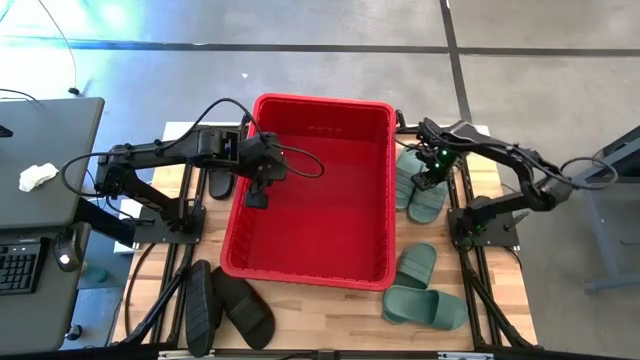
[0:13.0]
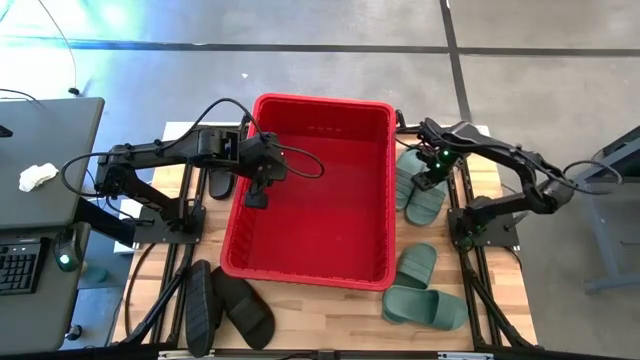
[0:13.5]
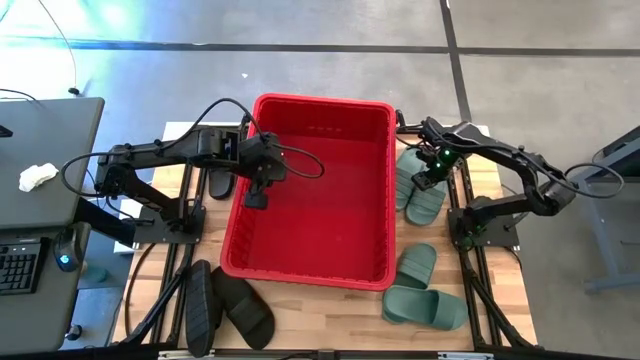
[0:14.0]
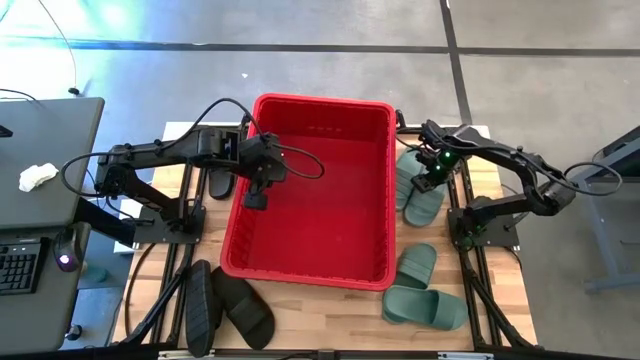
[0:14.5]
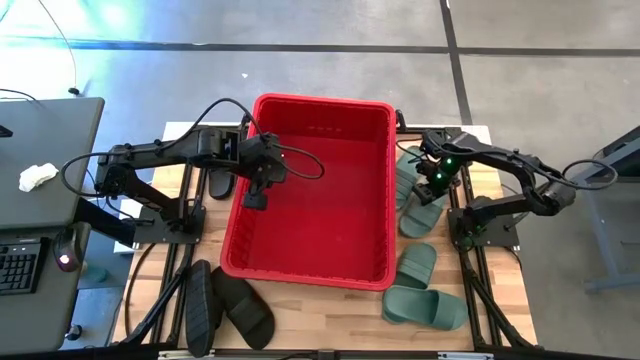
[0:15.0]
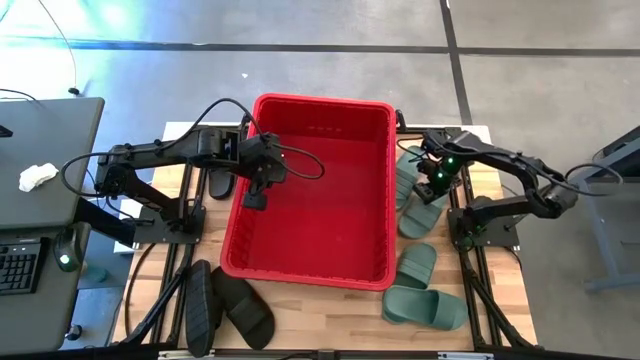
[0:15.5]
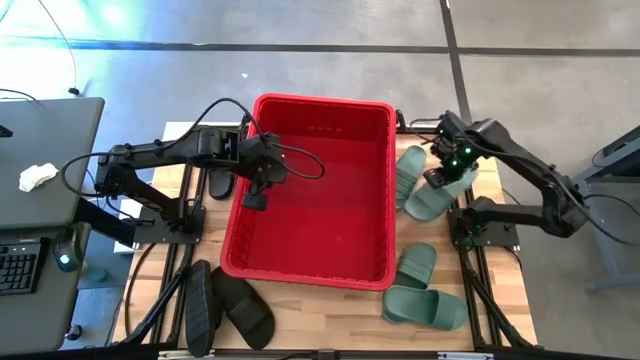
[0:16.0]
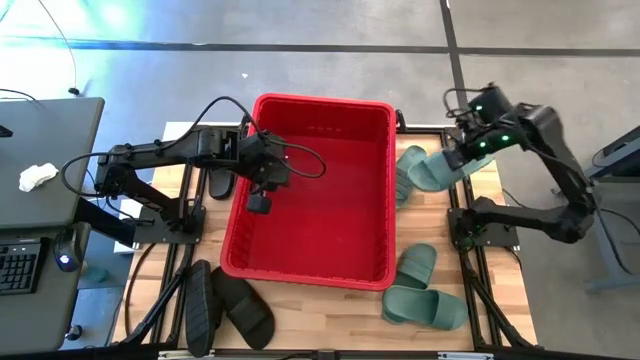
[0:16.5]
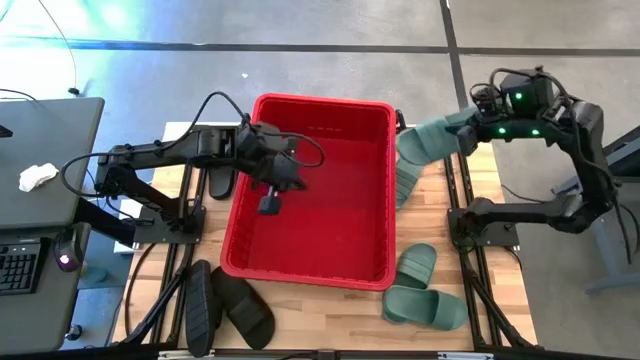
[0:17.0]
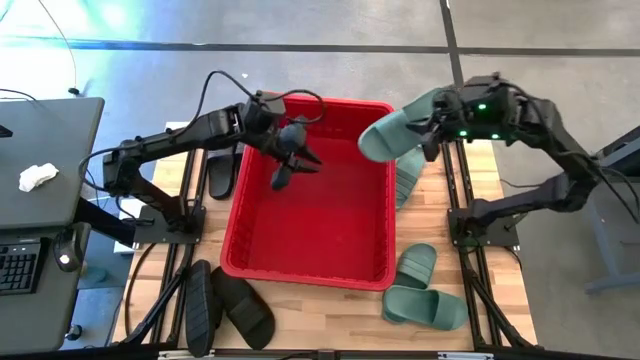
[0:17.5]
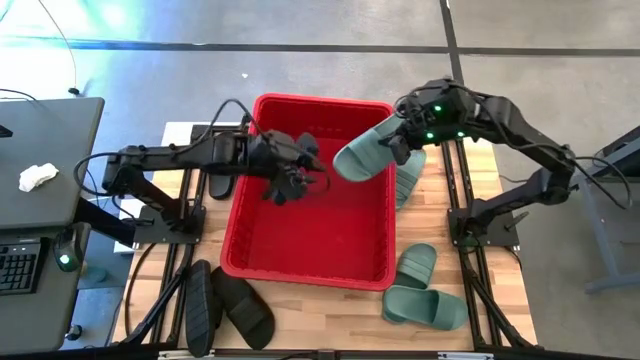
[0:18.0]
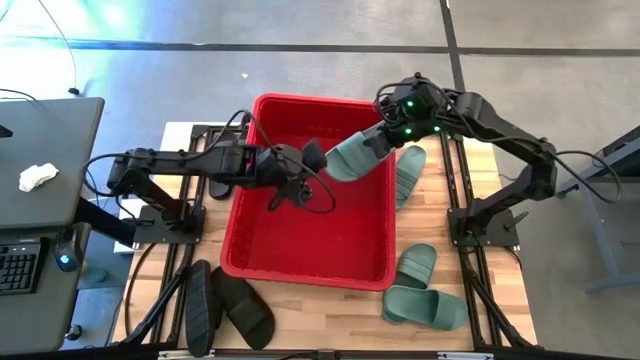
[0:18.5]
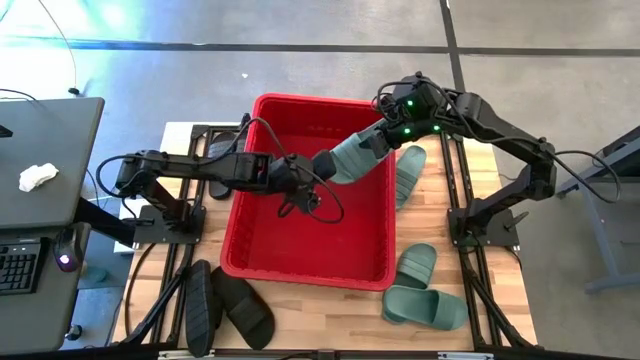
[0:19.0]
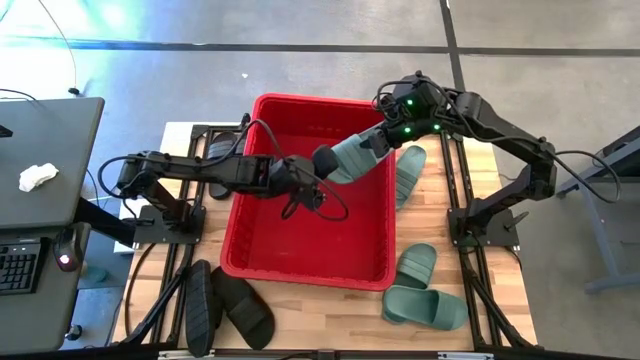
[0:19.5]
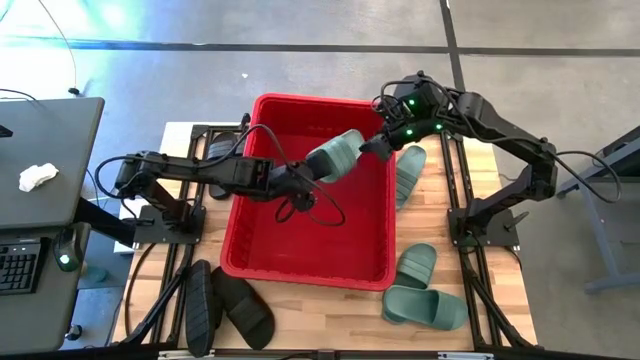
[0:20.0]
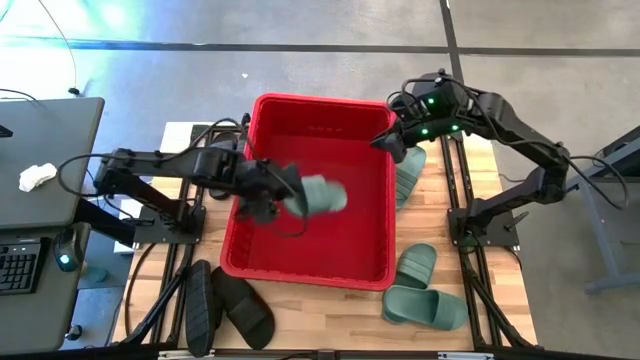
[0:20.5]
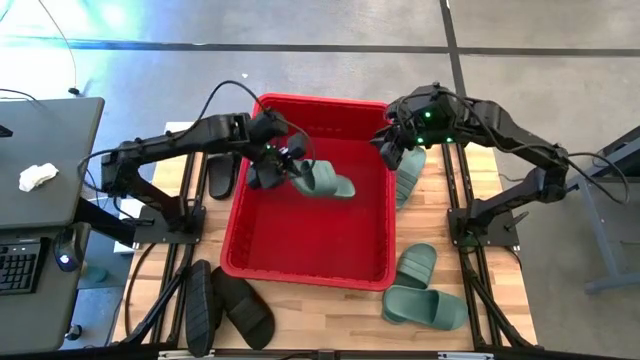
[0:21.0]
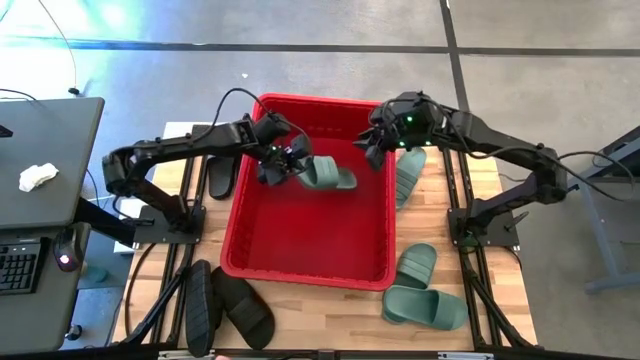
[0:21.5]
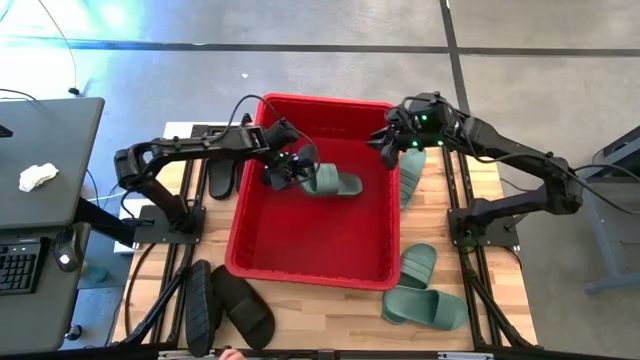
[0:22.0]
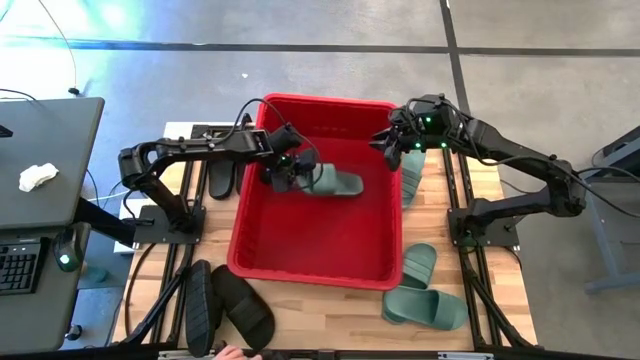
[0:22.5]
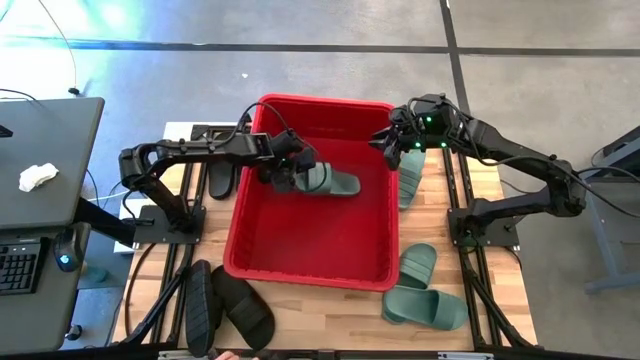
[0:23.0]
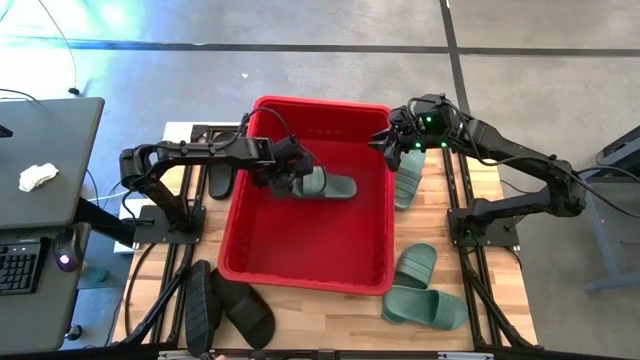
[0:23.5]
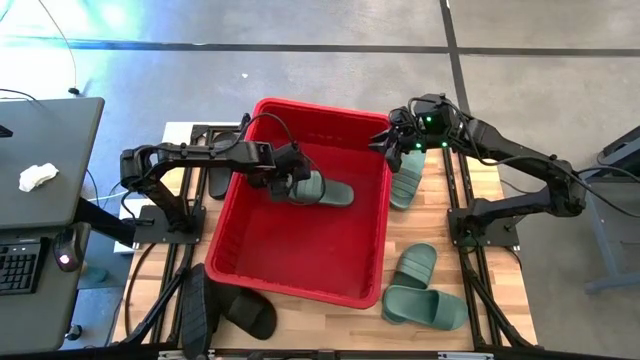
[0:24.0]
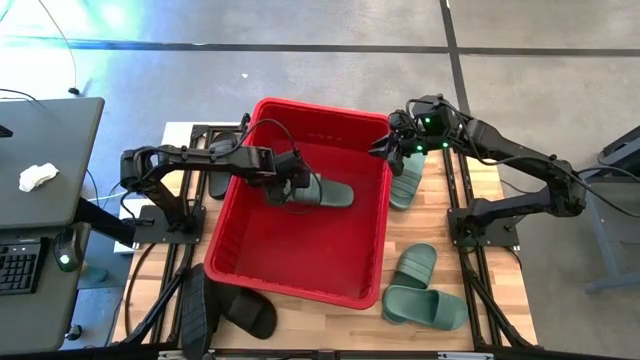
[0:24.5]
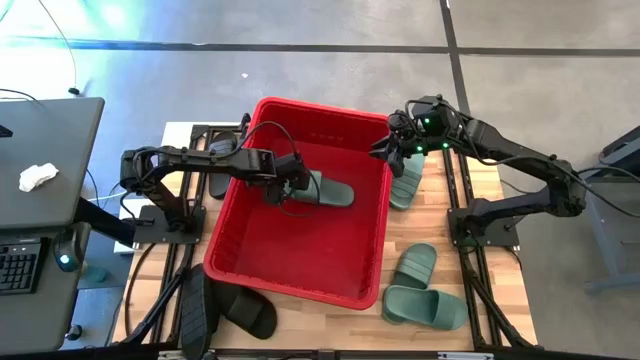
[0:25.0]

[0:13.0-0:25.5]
Task: Pick and place slides into bin
Put the green slide into the red container

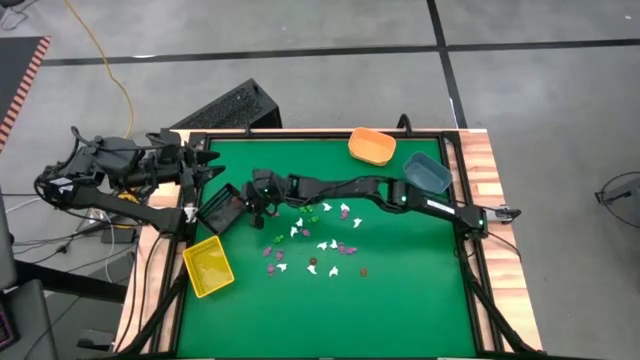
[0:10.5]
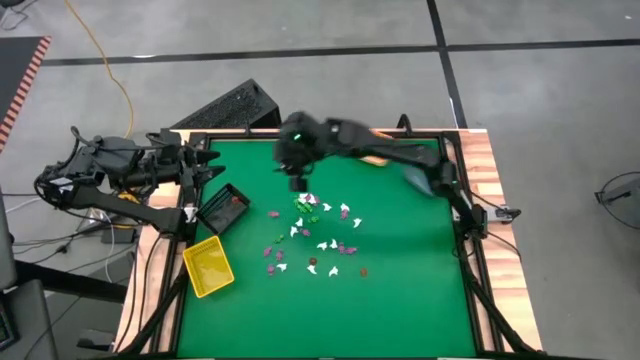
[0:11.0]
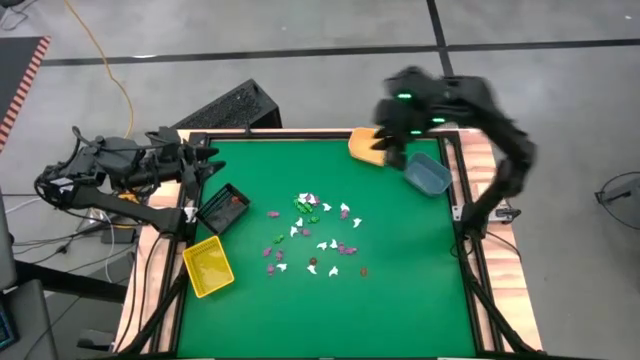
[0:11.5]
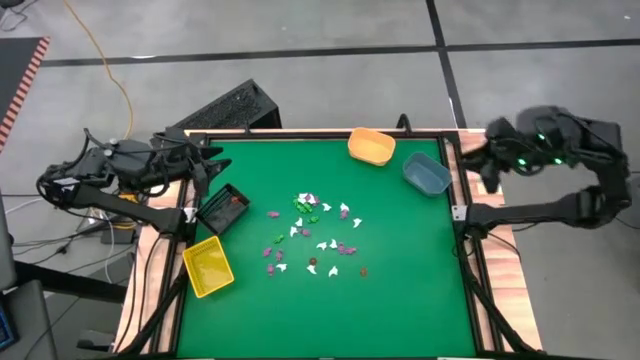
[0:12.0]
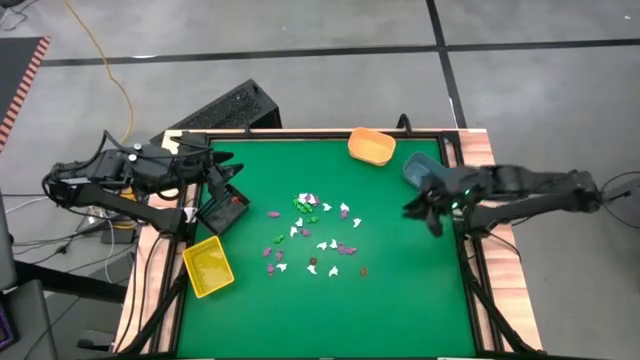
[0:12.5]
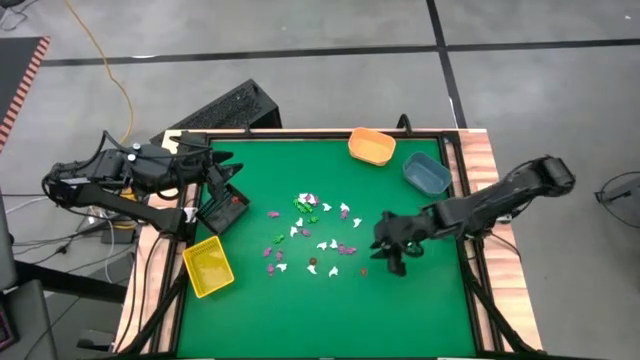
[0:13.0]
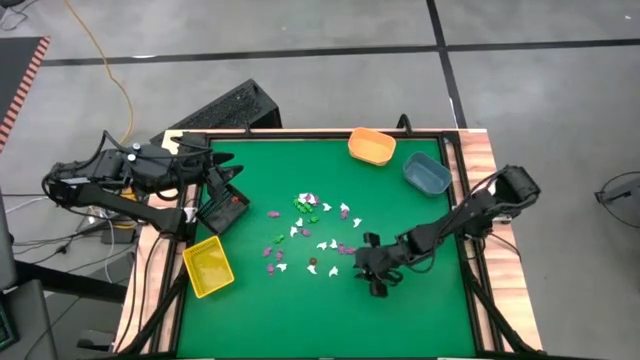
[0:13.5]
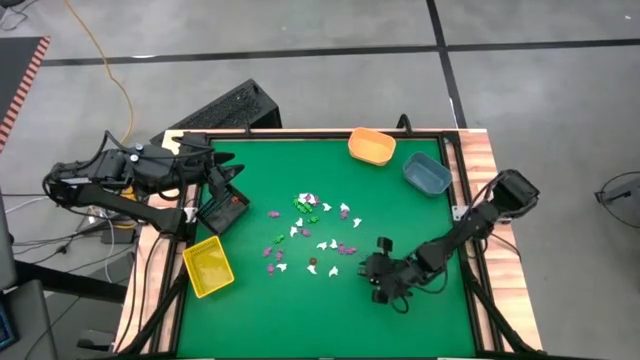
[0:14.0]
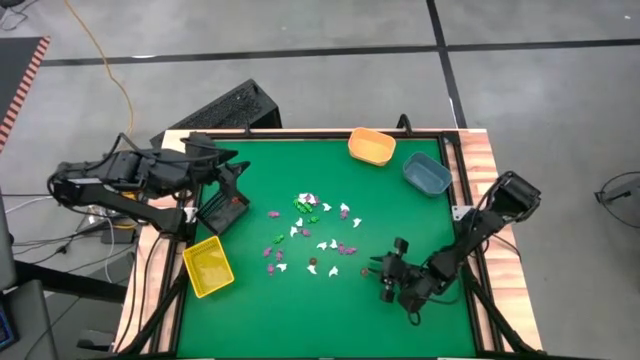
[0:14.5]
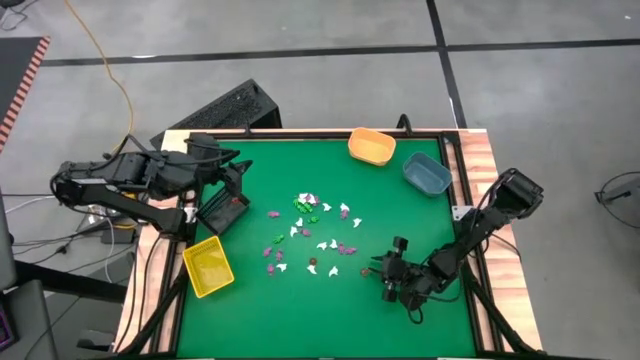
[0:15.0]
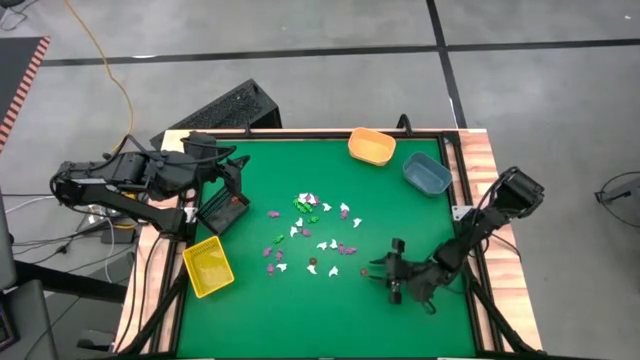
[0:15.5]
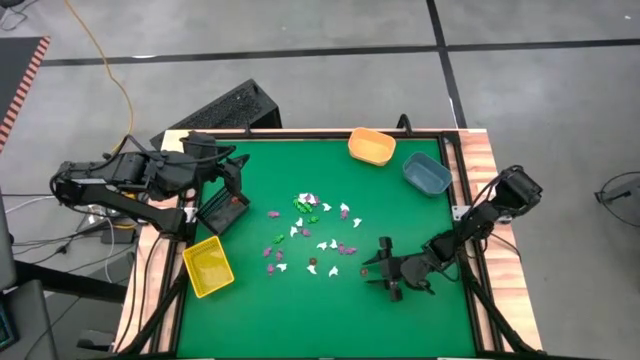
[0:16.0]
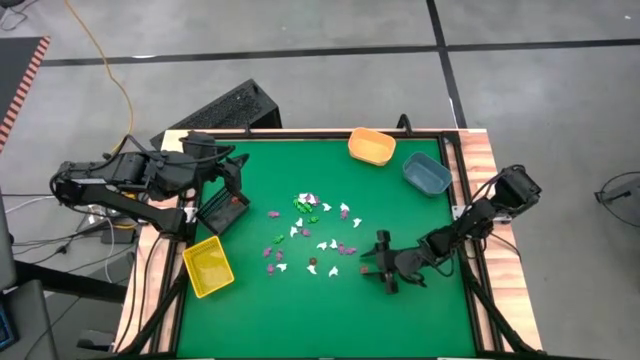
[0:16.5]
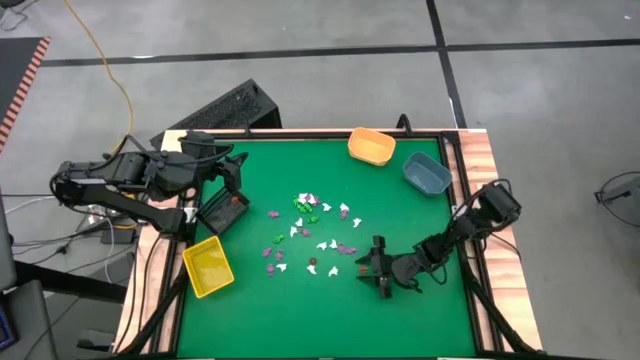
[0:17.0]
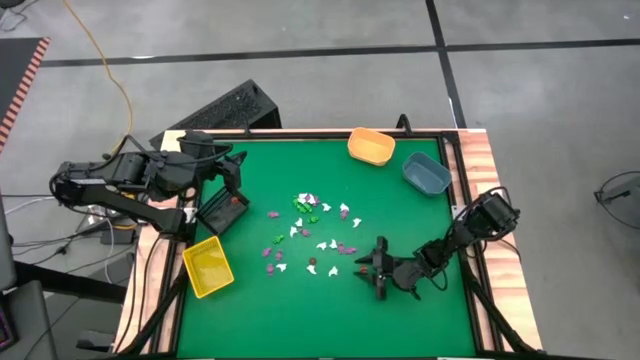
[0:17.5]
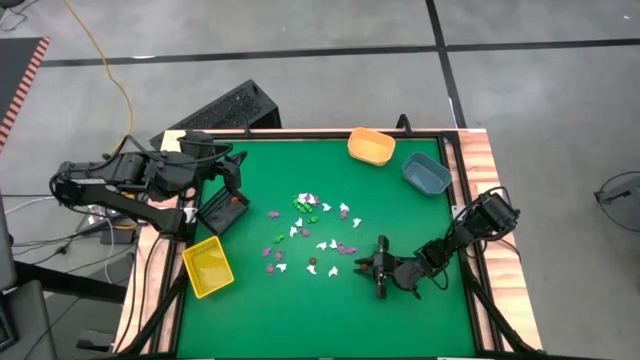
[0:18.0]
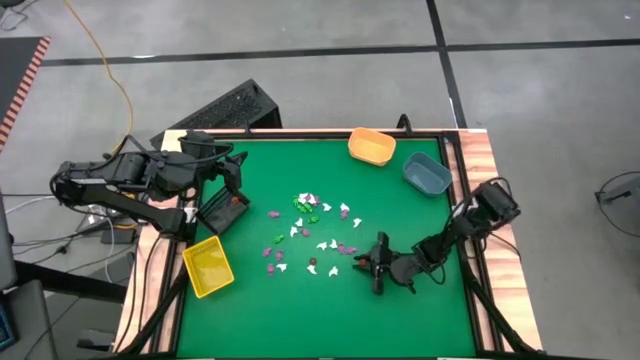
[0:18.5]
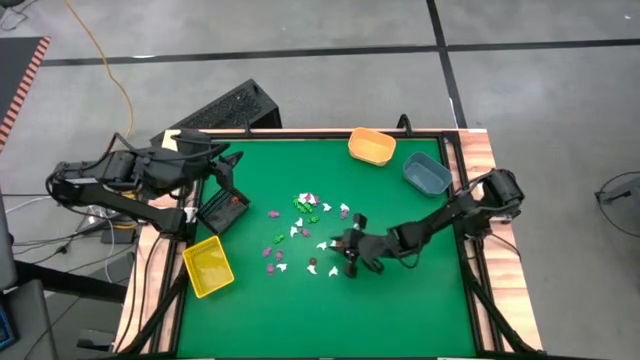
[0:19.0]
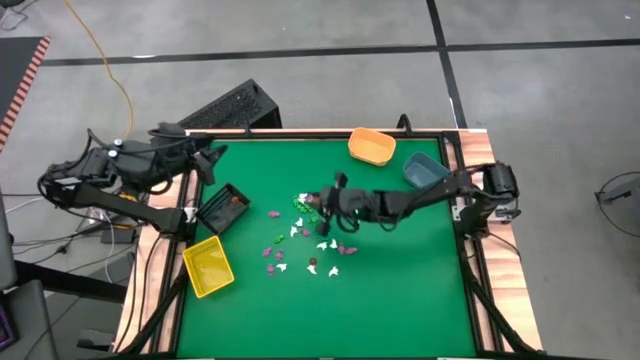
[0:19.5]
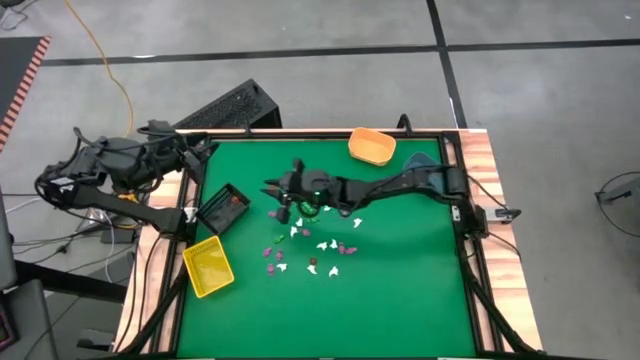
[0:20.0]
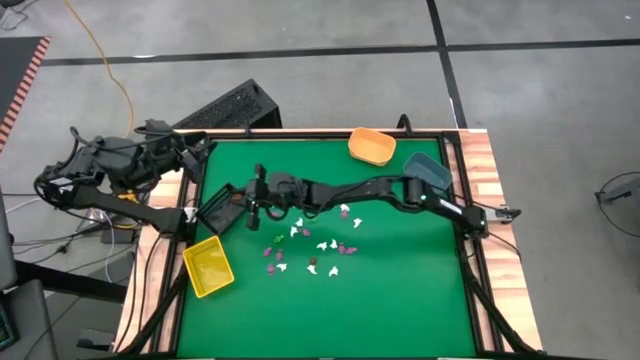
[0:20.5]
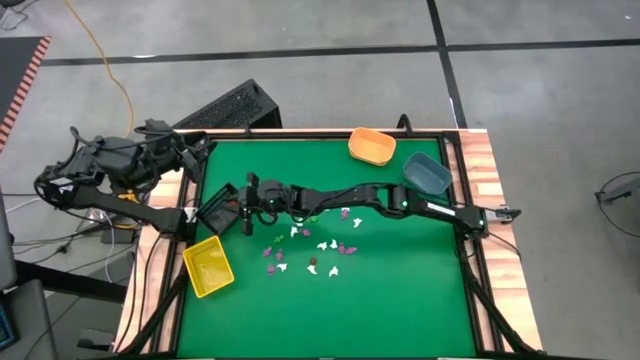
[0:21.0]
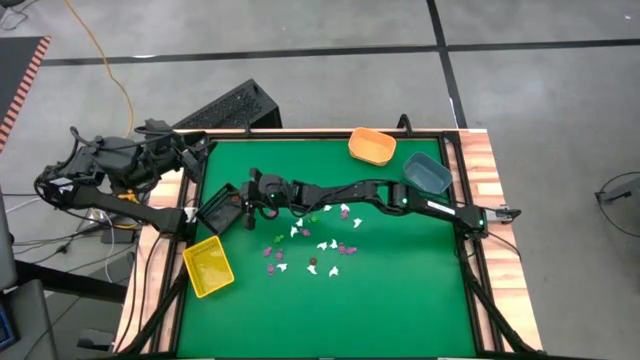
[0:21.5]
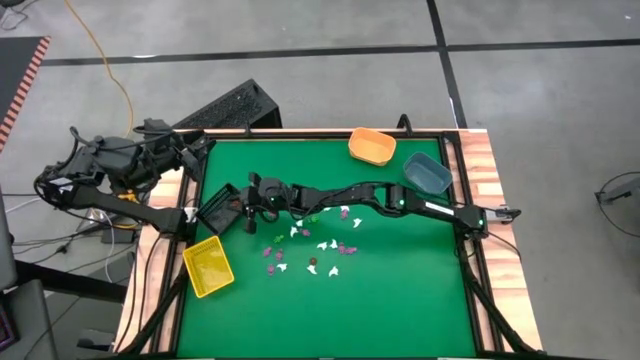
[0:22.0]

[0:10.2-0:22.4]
Task: Sort Halloween decoration
Put the orange pumpkin toy into the black bin
